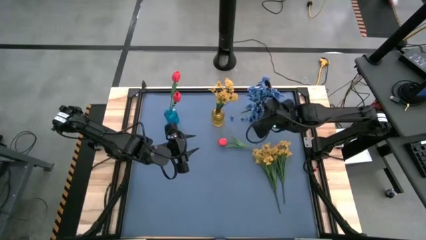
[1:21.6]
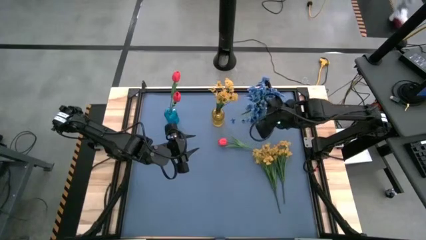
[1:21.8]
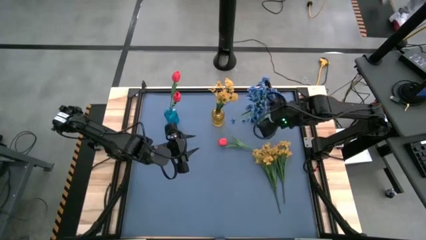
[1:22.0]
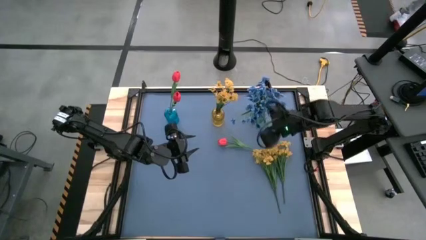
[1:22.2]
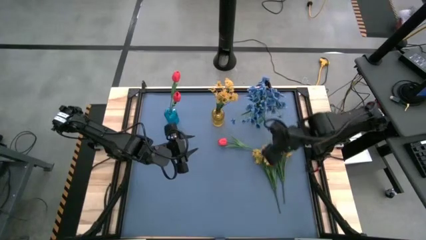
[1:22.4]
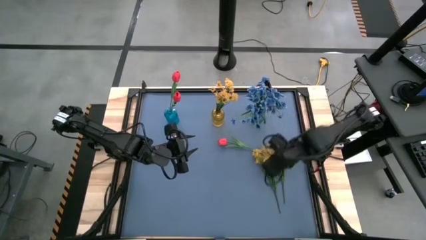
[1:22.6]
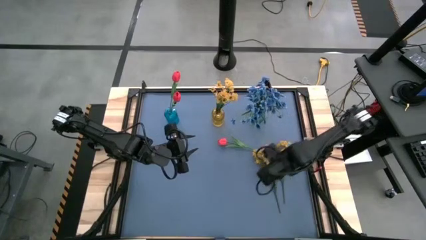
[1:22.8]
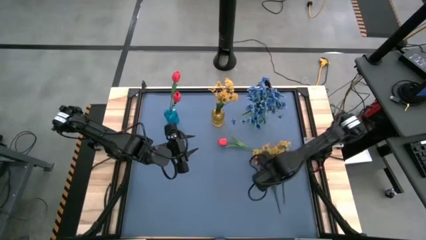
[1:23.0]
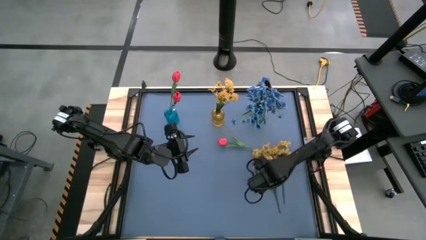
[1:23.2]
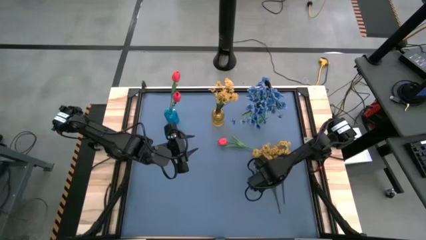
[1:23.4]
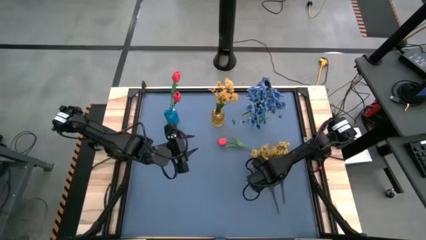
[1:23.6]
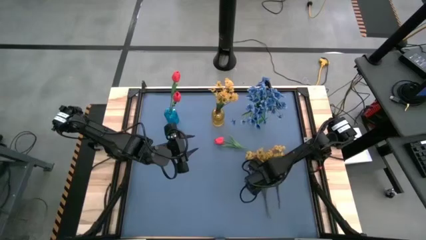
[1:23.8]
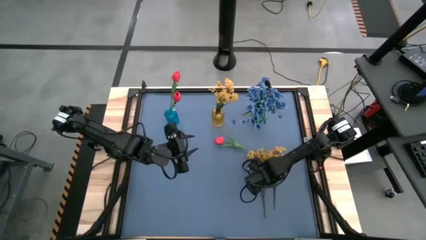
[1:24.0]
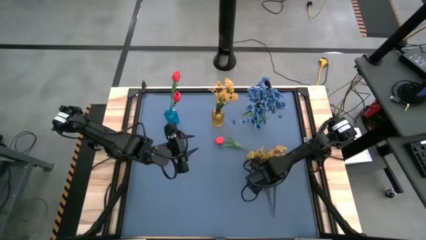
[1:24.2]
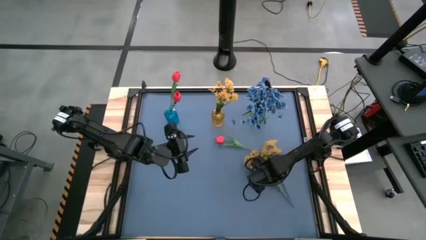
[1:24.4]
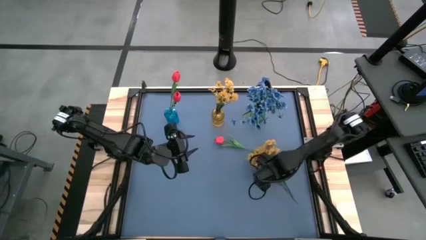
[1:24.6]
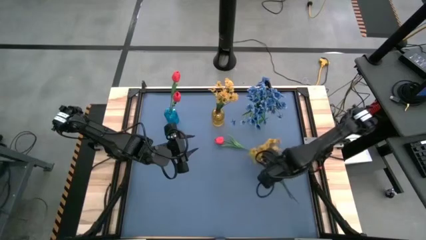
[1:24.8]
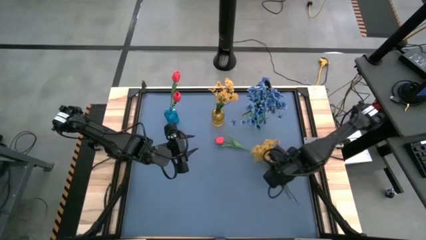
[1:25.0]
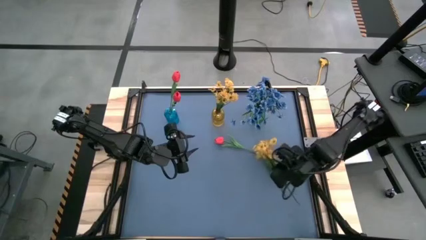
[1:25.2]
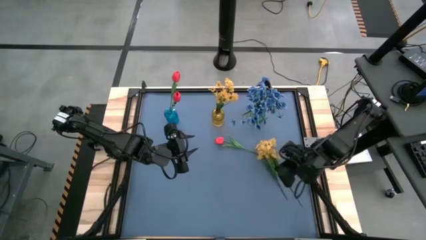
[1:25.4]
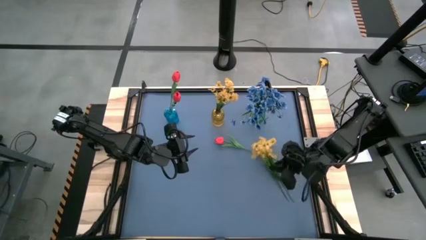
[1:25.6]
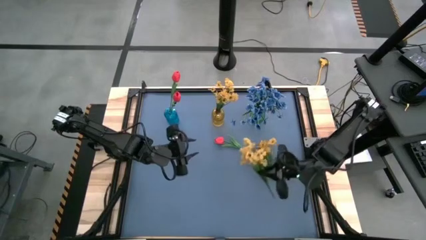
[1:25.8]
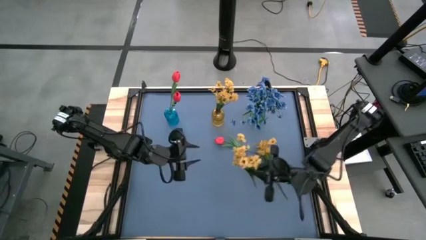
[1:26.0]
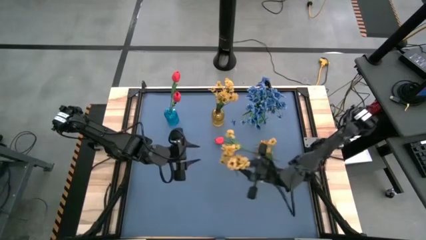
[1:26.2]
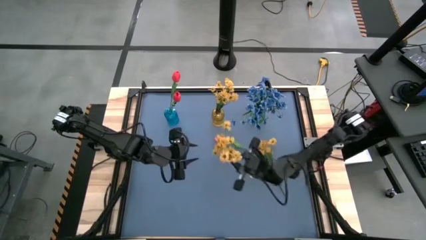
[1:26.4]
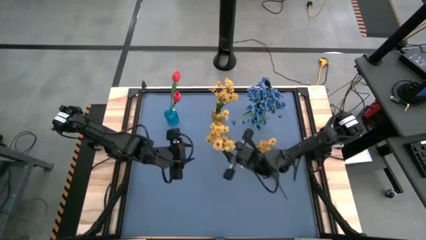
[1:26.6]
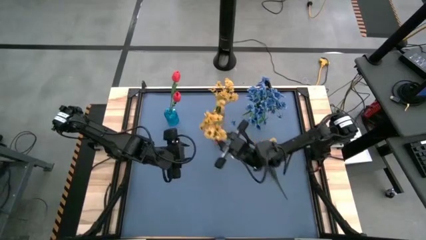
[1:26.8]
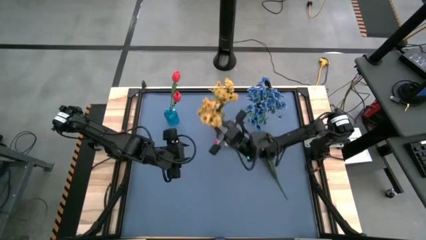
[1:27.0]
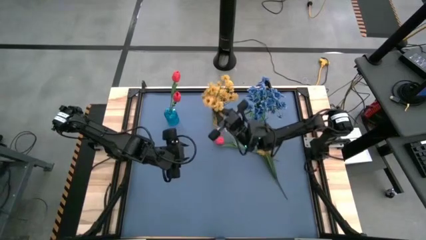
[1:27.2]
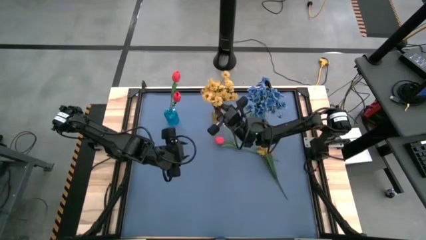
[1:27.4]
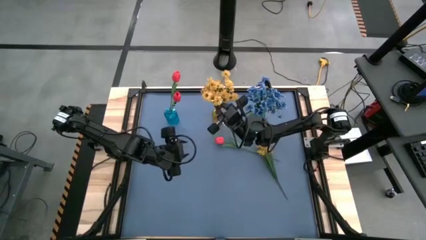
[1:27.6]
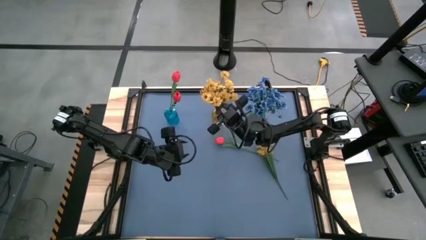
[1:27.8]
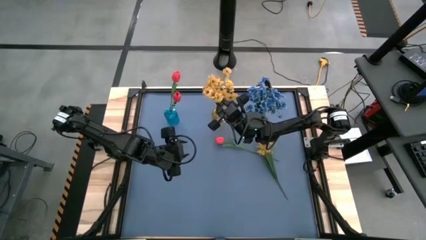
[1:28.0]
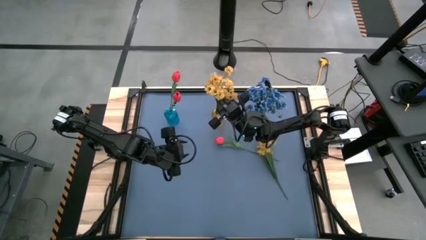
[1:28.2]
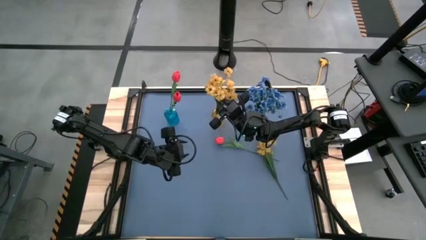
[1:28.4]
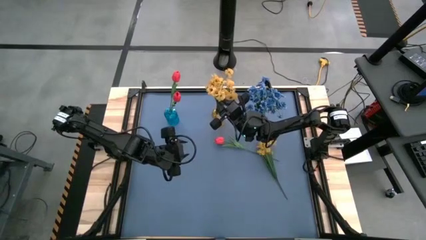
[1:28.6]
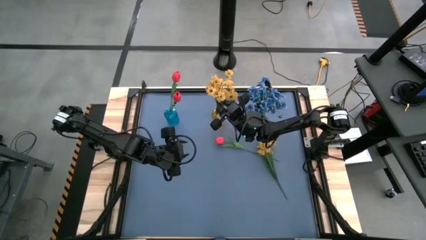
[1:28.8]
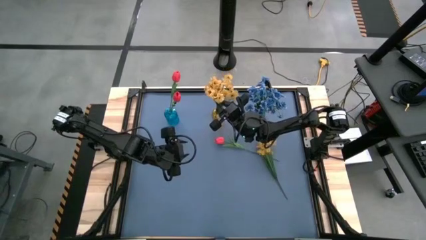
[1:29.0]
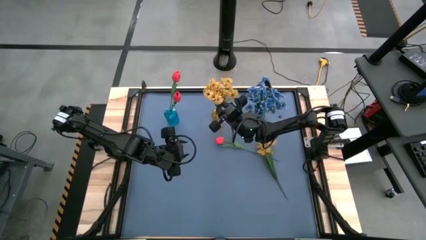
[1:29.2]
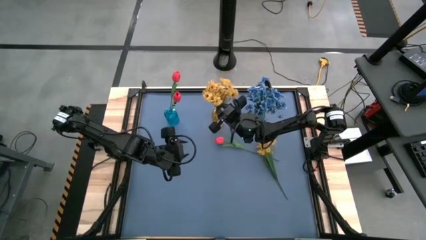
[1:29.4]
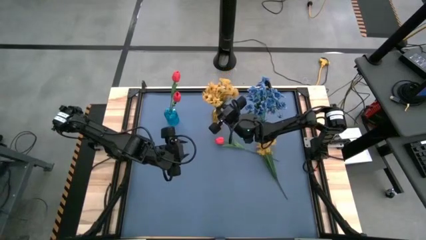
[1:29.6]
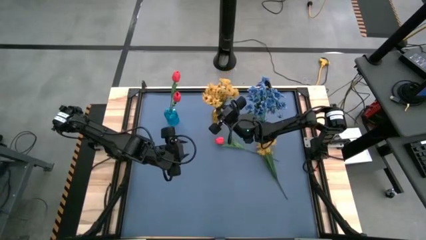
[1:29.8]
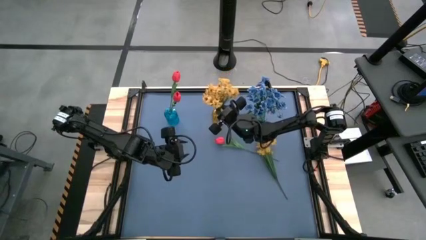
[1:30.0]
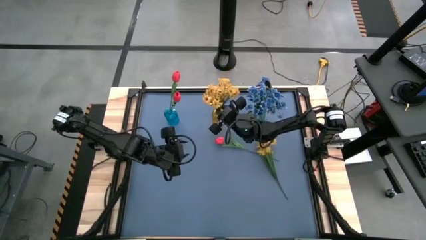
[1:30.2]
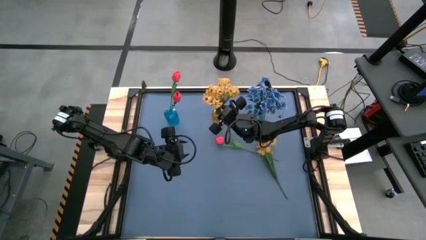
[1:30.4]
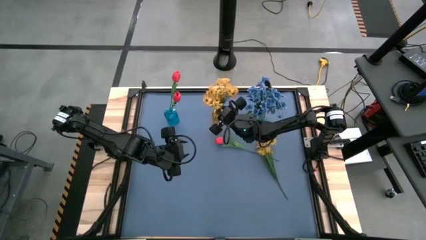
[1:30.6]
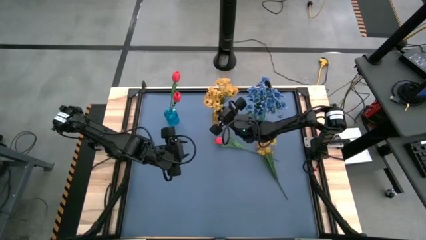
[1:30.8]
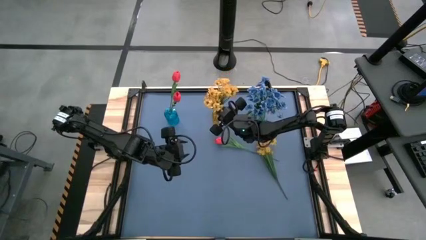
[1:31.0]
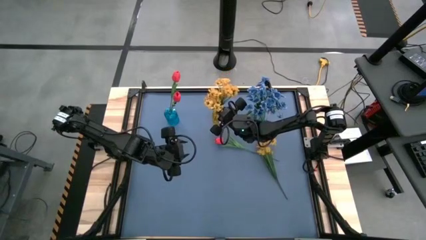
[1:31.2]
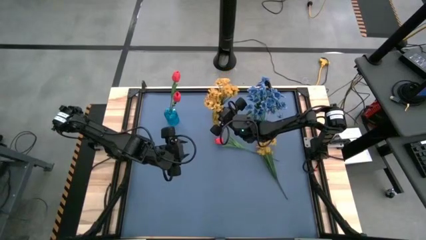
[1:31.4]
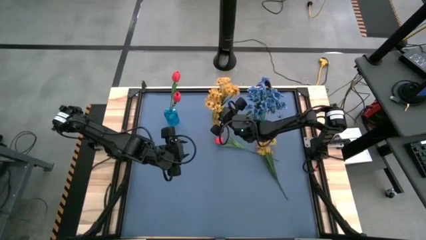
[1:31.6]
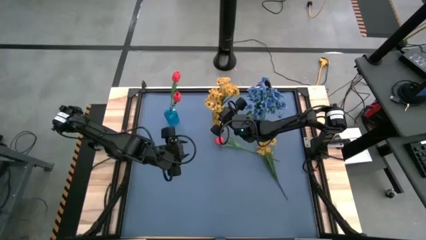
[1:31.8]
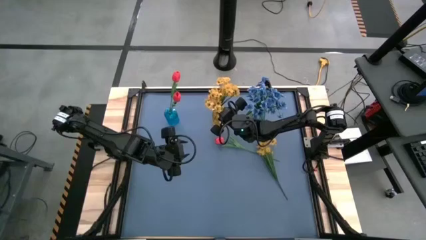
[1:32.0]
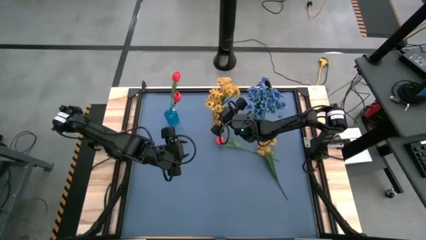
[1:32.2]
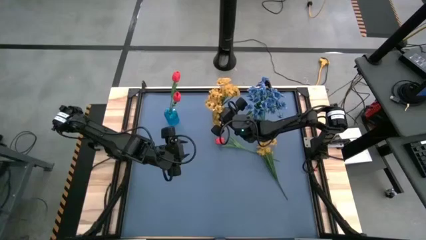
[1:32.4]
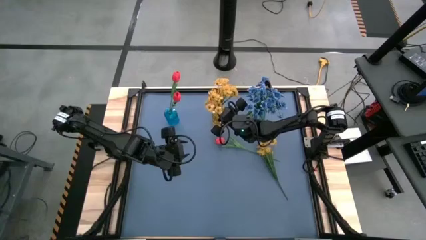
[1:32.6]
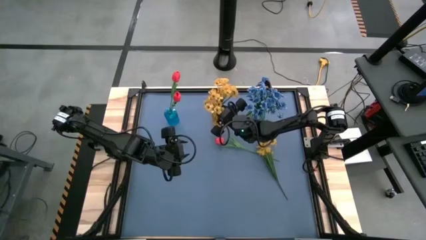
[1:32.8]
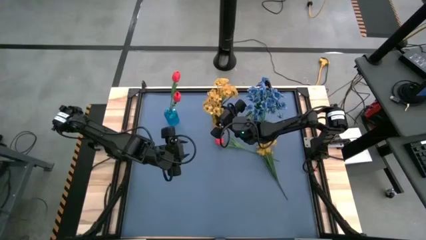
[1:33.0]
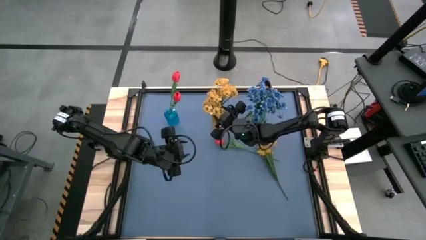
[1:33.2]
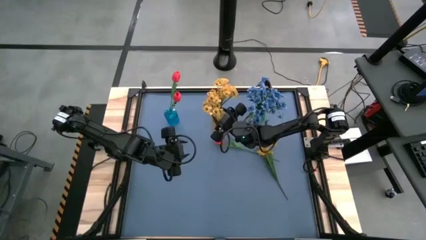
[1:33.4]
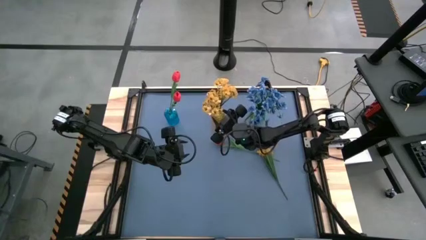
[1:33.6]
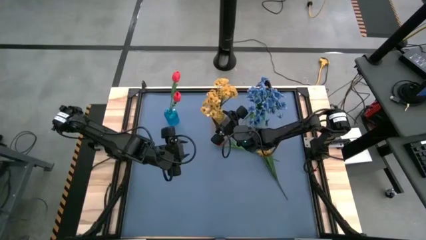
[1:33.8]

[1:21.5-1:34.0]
Task: Sort flowers into vase by color
Put the left yellow flowers into the yellow vase
